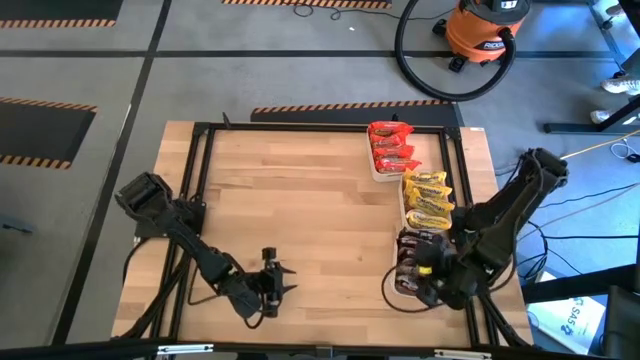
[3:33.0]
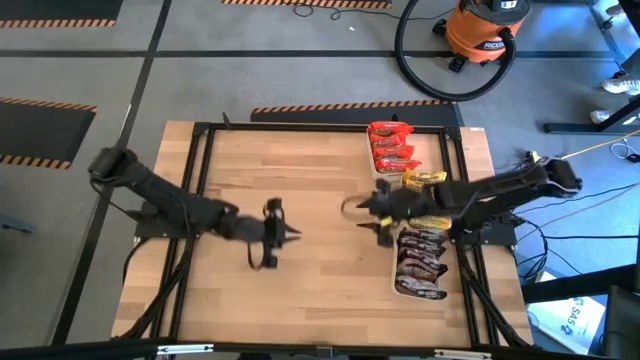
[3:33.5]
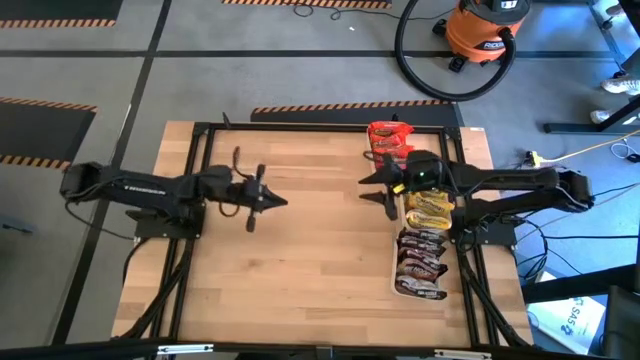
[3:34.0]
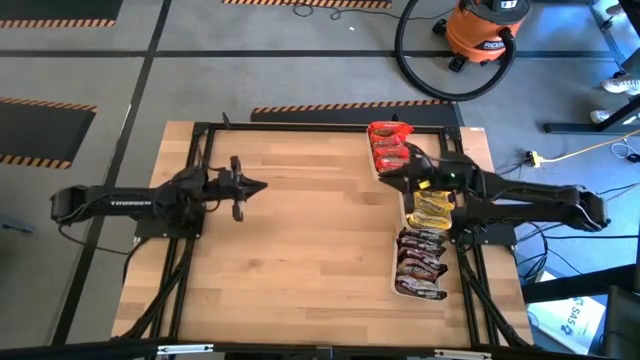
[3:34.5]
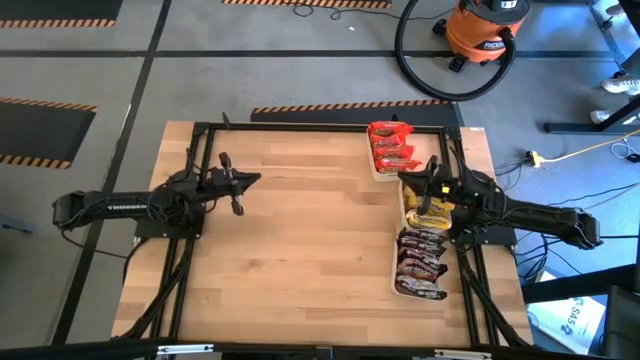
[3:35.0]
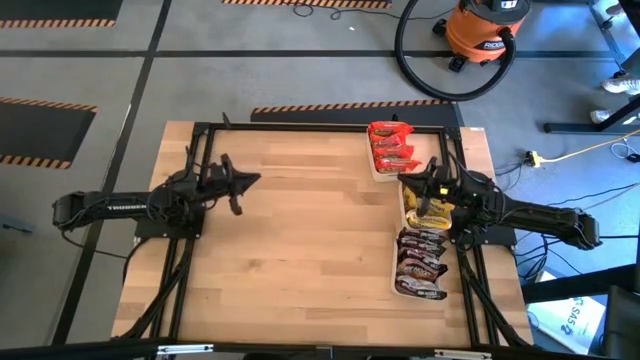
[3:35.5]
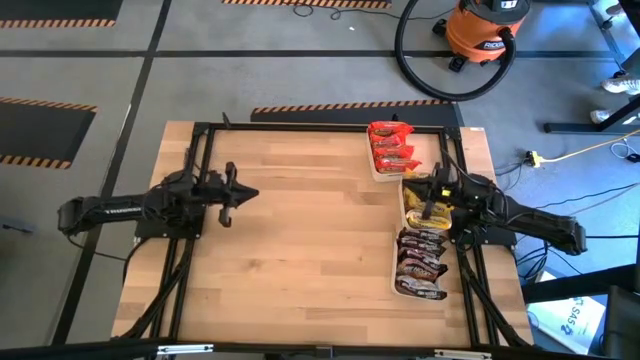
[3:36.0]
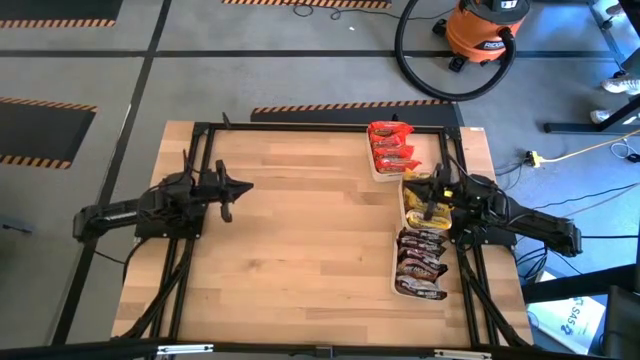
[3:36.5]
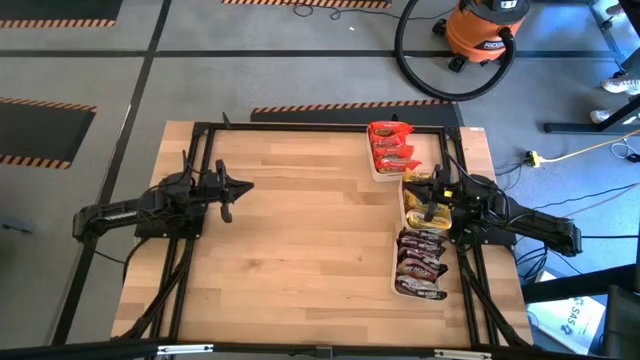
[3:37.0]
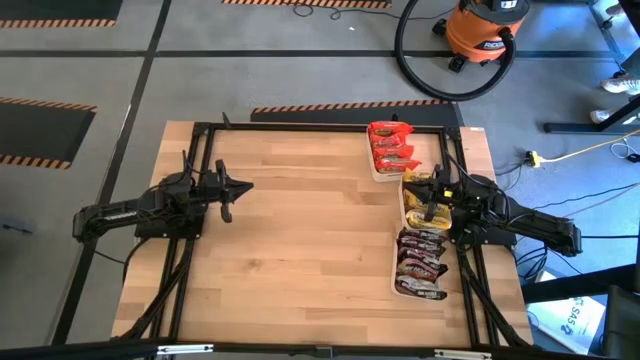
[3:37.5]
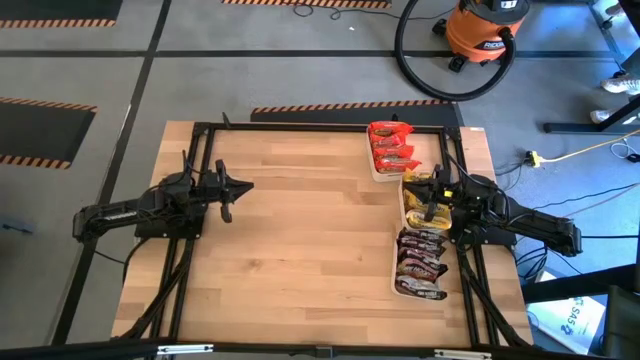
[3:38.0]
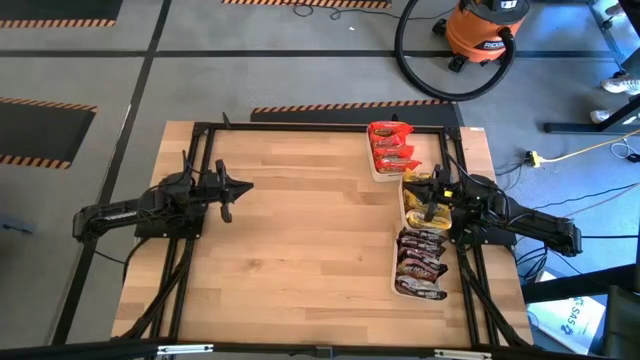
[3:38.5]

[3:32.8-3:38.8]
Task: Sort Maruchan noodles
Return to Home Position

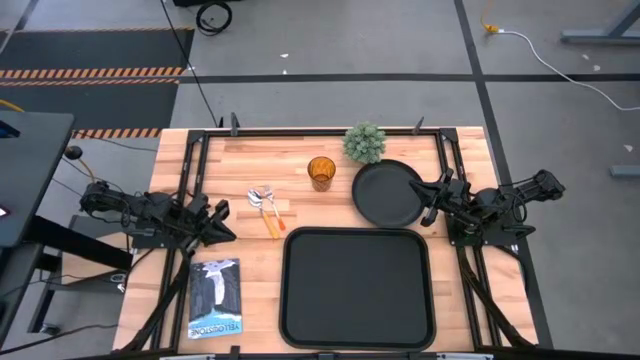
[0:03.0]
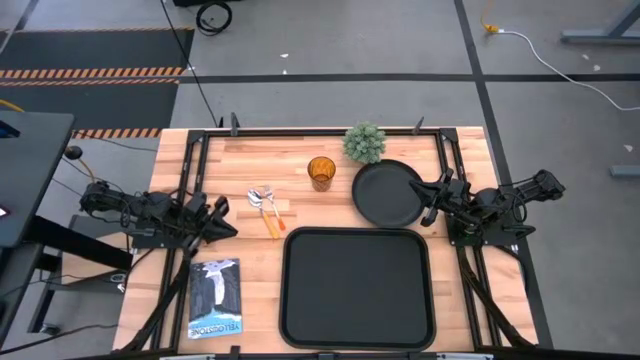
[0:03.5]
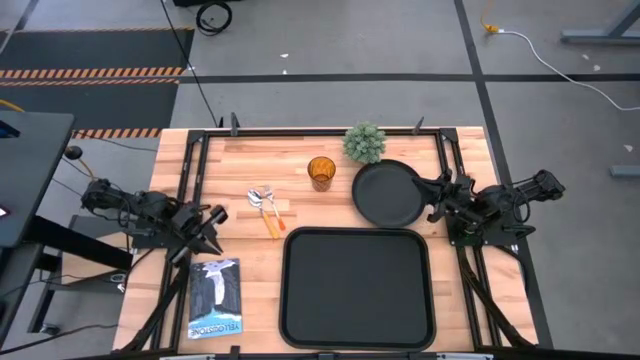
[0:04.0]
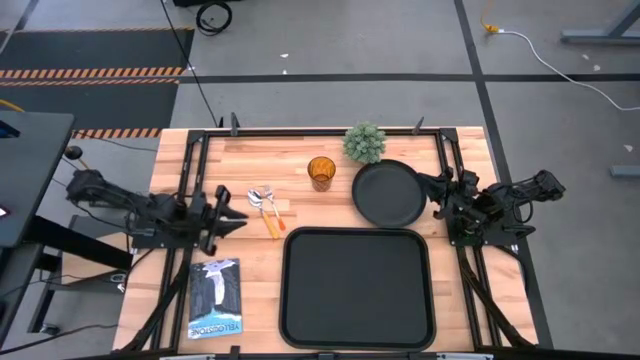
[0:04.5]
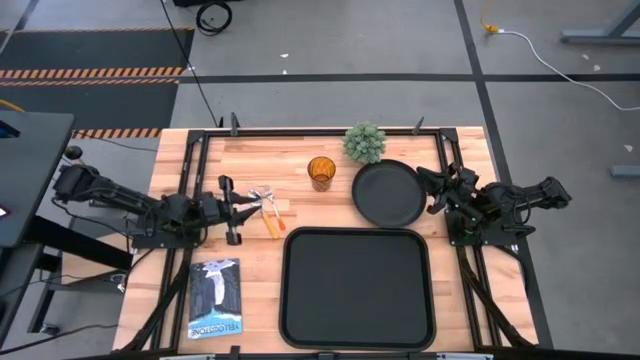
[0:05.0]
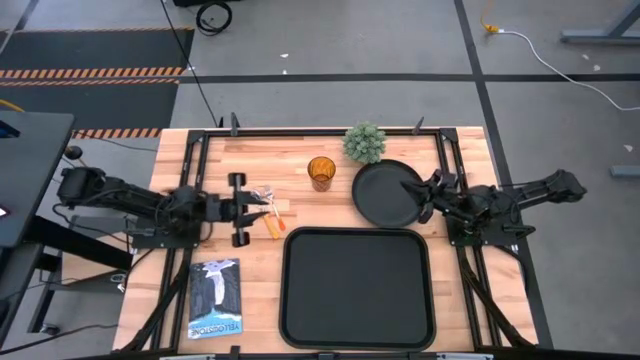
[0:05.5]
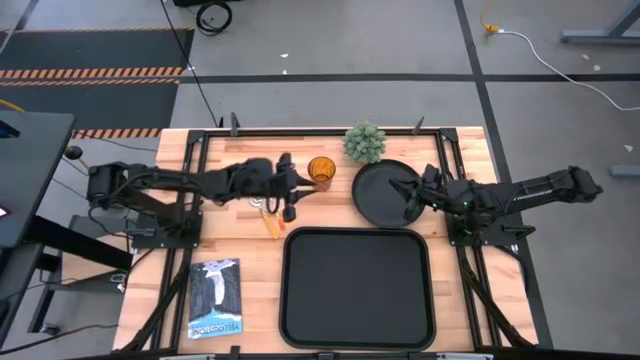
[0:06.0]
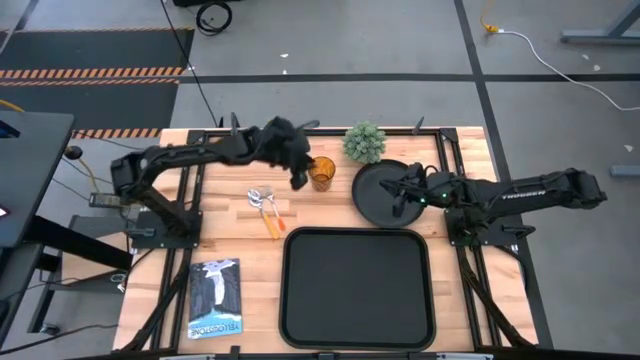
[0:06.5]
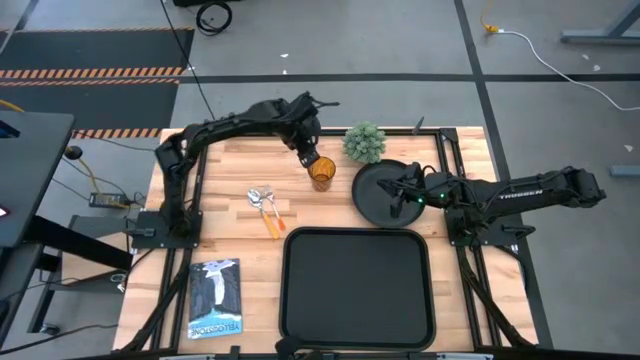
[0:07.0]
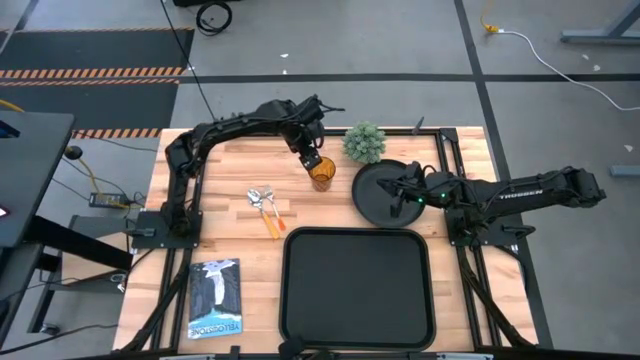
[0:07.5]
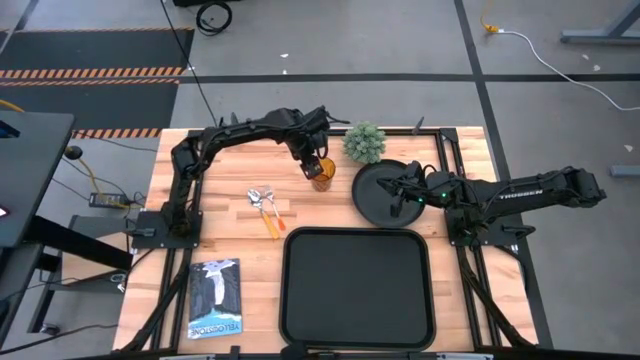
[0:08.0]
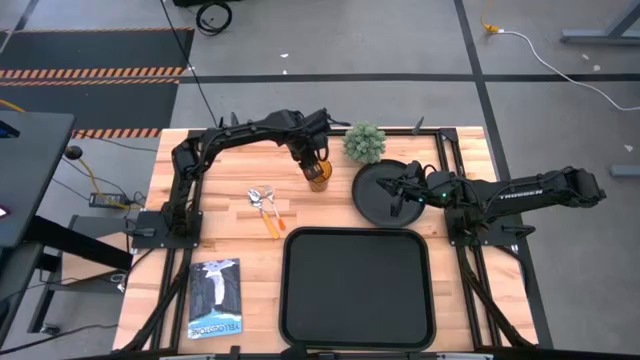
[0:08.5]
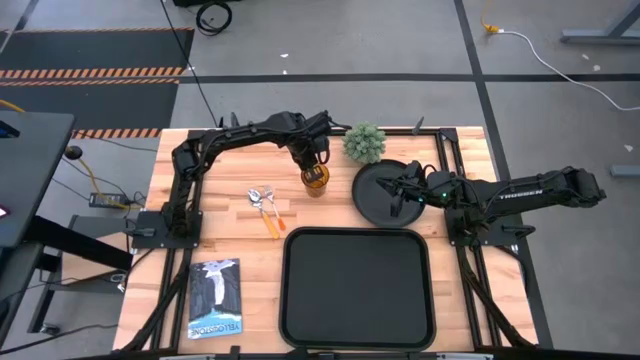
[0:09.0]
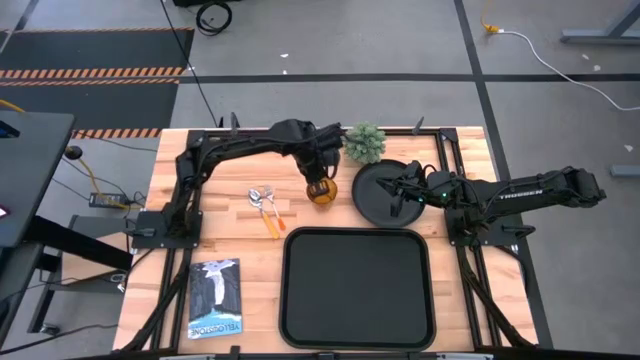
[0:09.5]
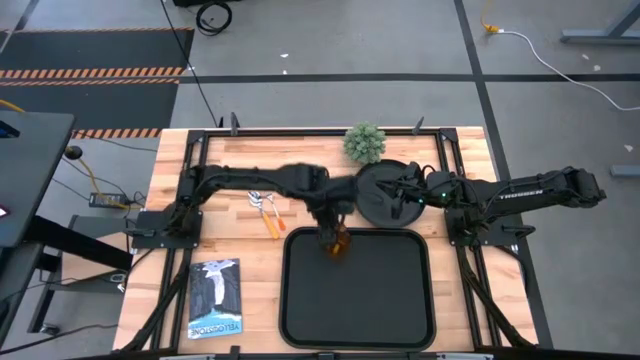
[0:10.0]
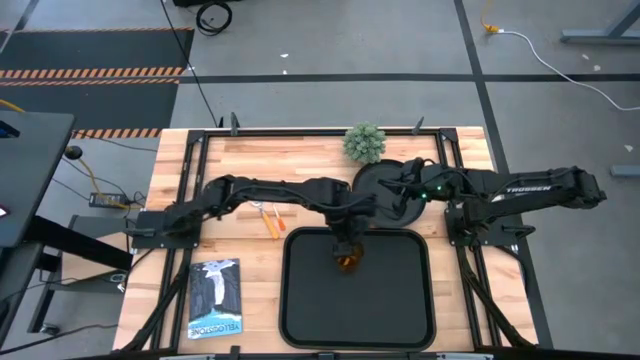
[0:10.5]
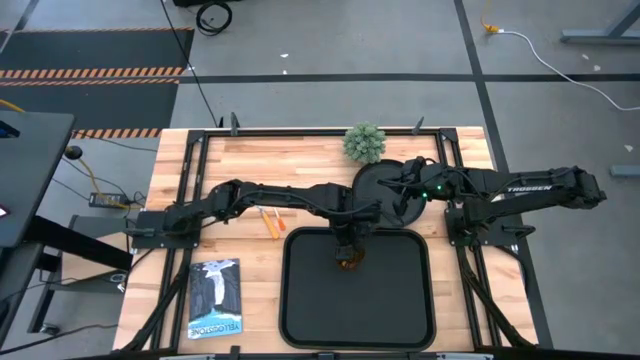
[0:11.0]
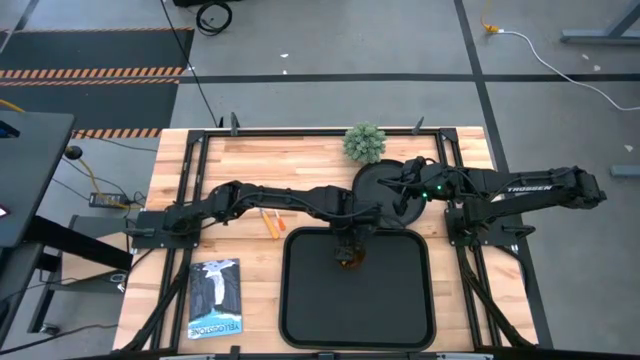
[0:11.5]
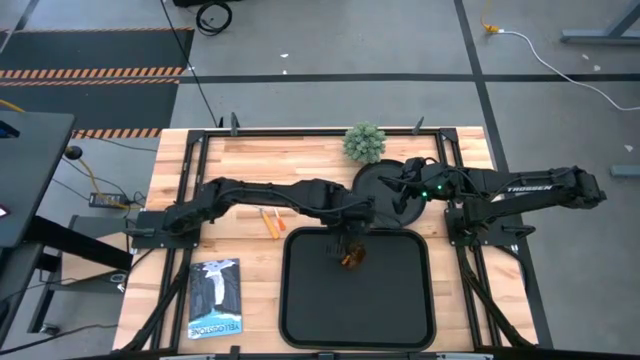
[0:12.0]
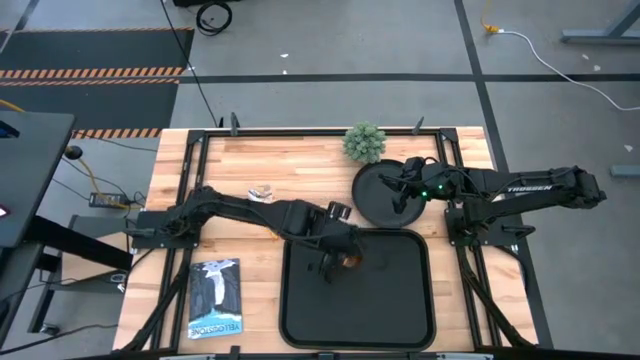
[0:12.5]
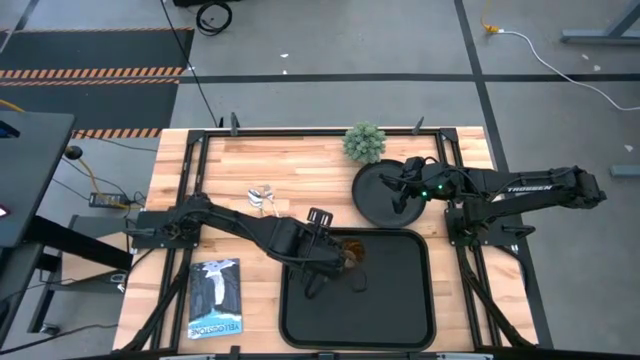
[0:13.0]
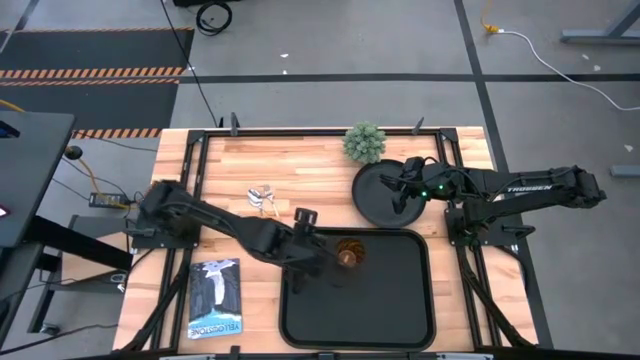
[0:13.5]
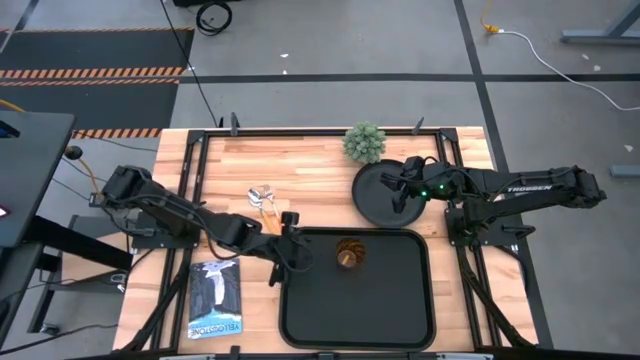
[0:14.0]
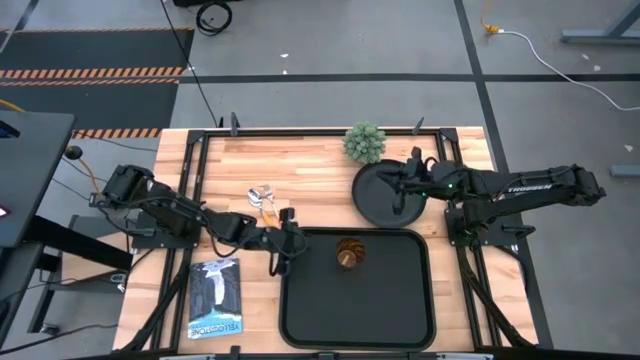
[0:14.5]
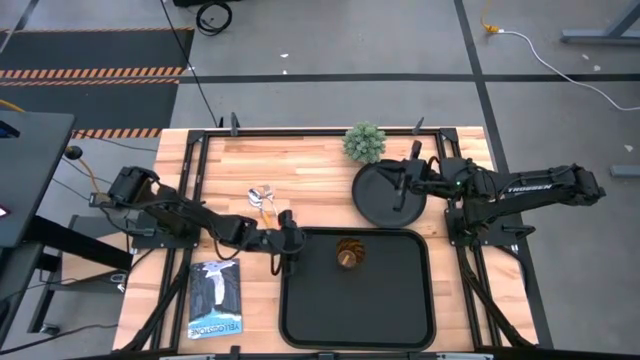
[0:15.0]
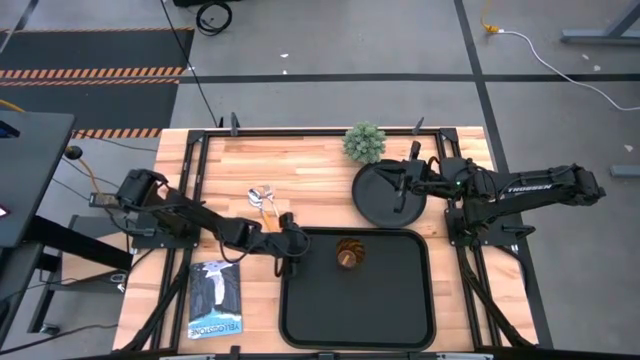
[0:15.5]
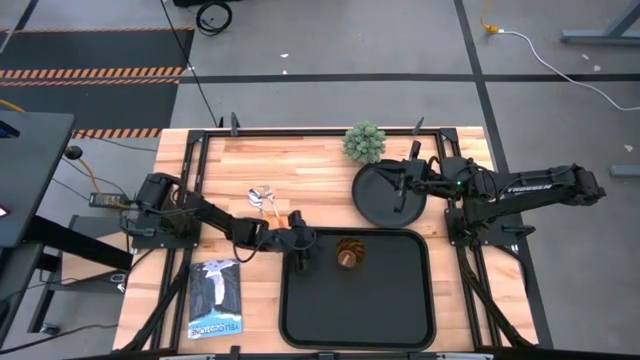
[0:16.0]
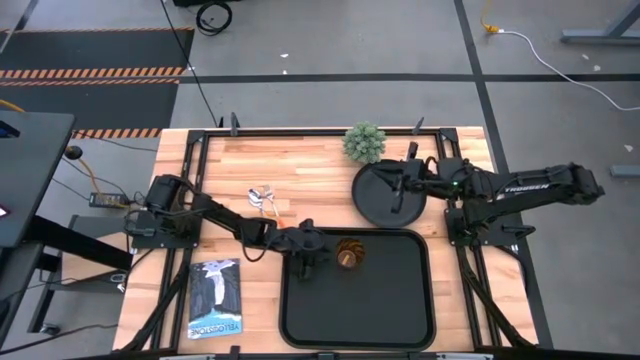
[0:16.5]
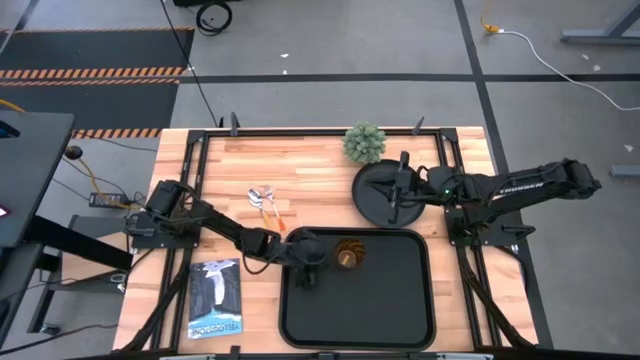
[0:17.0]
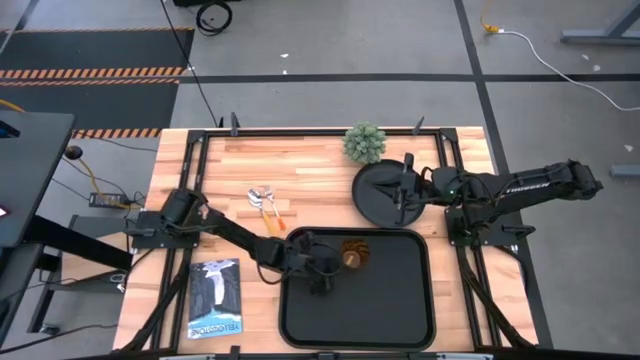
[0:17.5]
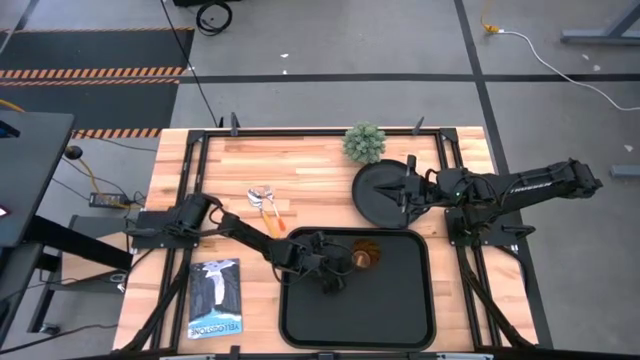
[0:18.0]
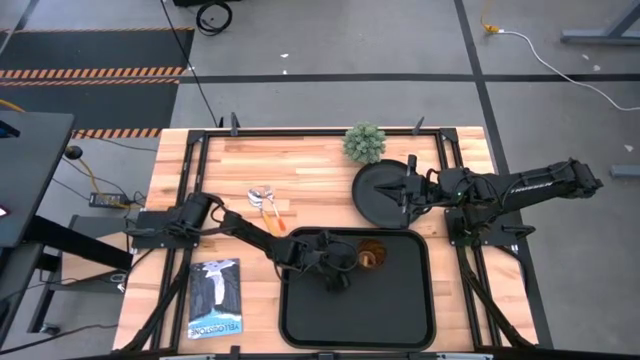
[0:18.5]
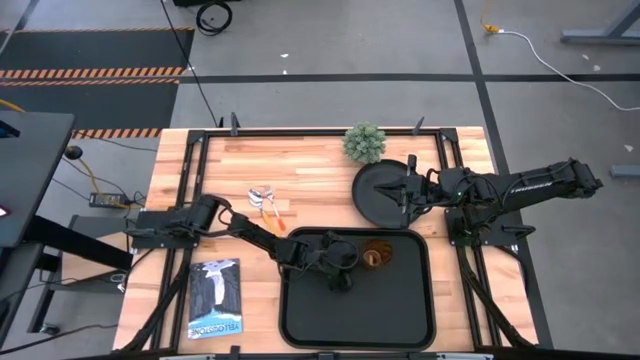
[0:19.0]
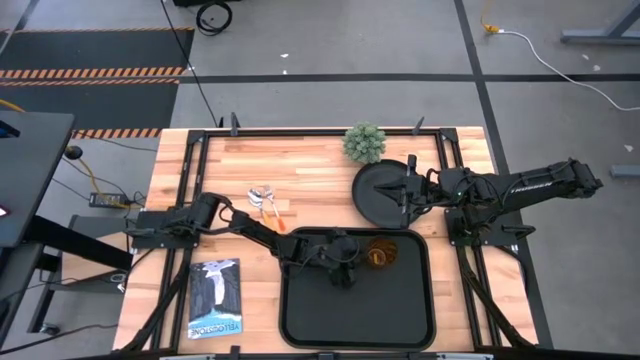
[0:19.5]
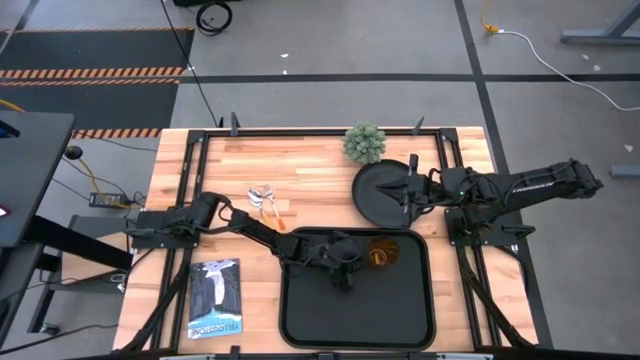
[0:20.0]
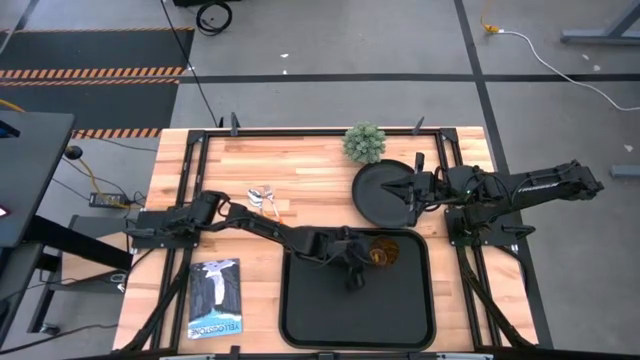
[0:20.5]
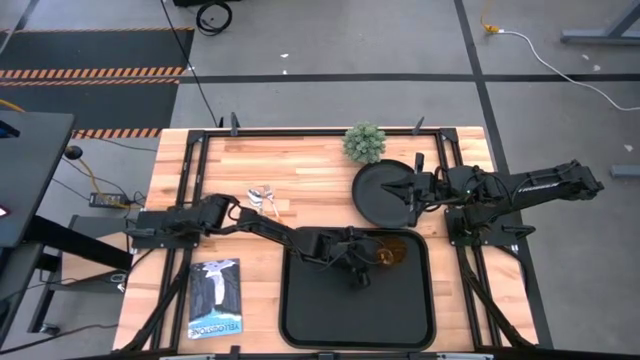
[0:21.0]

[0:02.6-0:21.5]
Task: Pick and place plate/cup/fork/spoon on tray
Put the brown cup on the black tray
